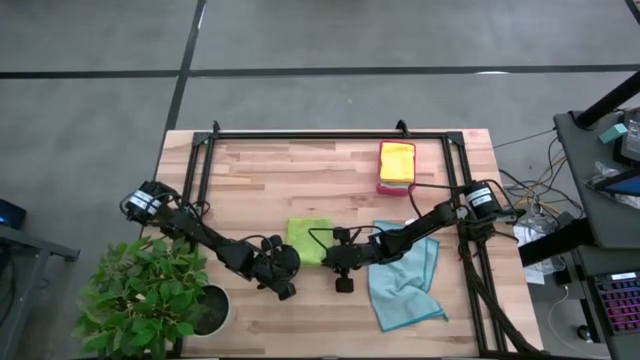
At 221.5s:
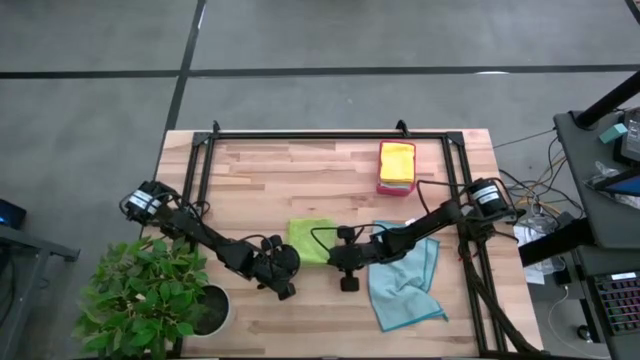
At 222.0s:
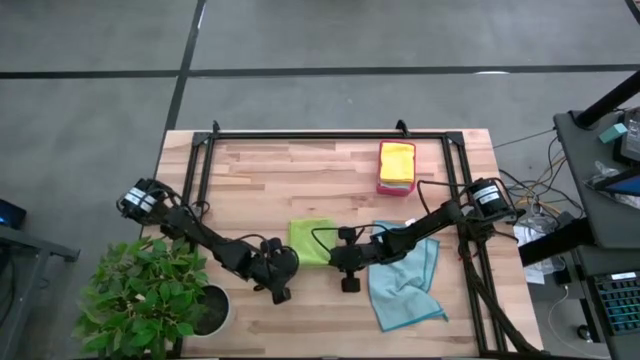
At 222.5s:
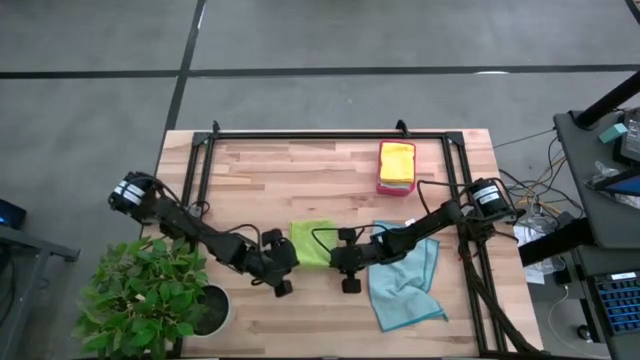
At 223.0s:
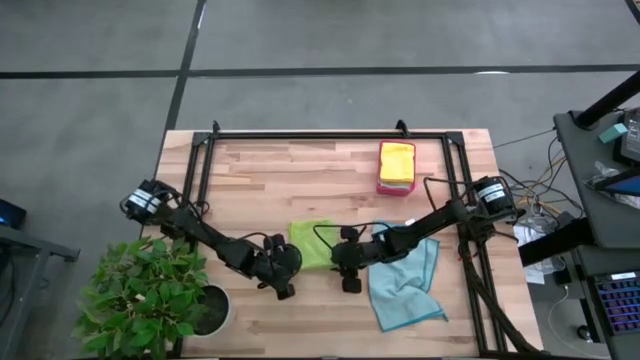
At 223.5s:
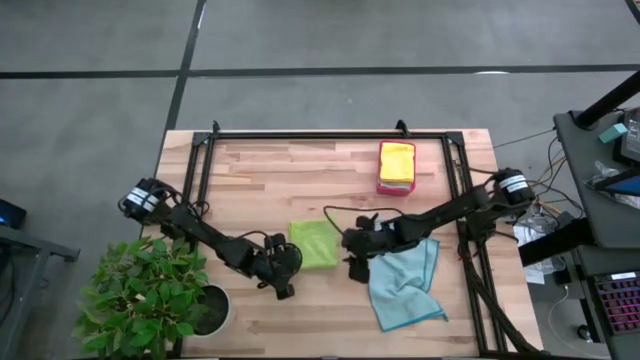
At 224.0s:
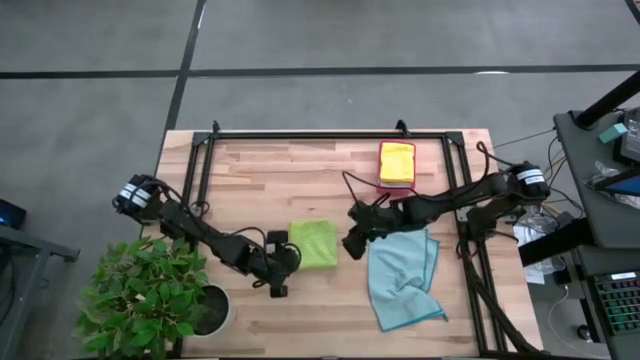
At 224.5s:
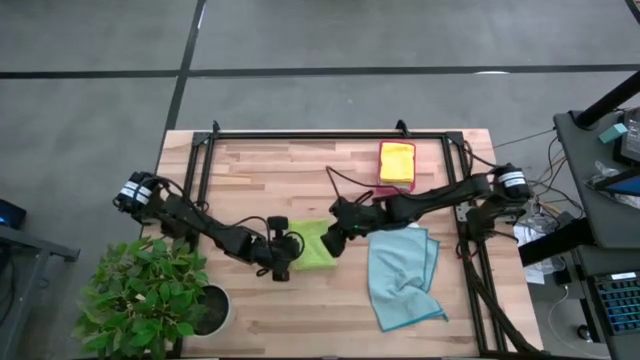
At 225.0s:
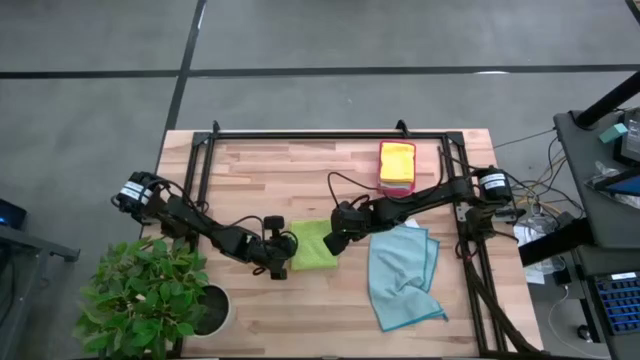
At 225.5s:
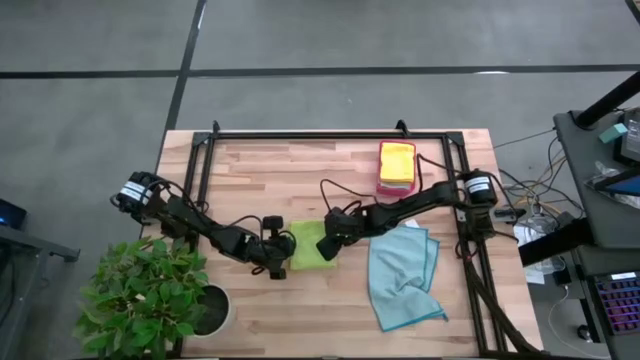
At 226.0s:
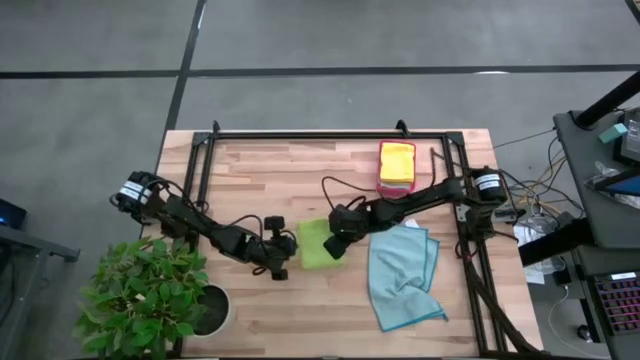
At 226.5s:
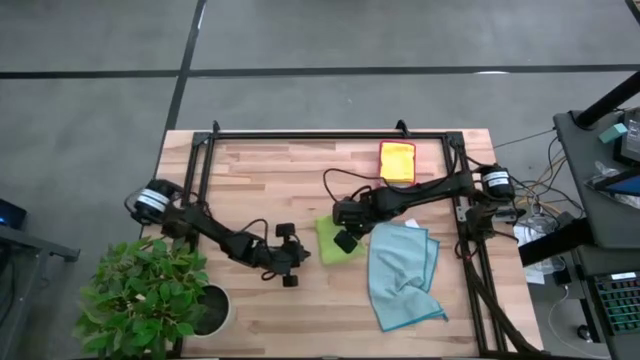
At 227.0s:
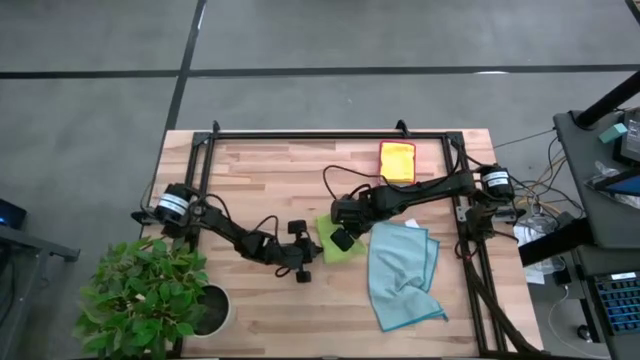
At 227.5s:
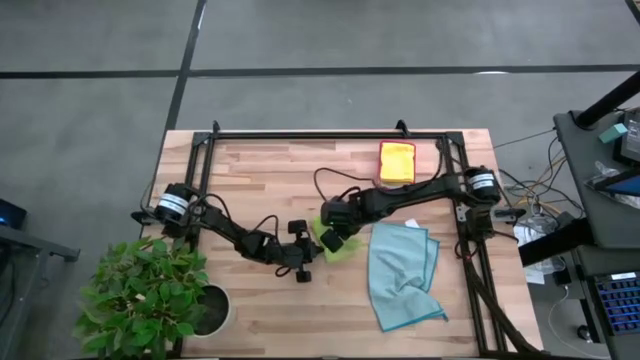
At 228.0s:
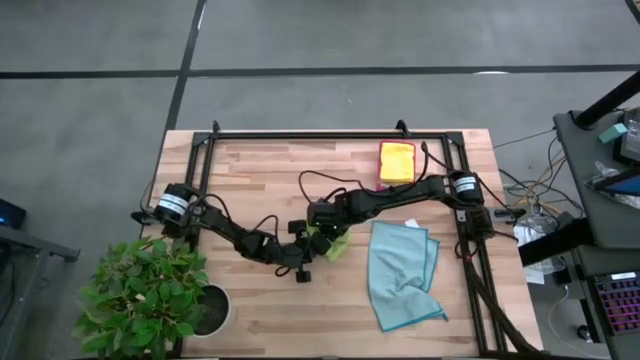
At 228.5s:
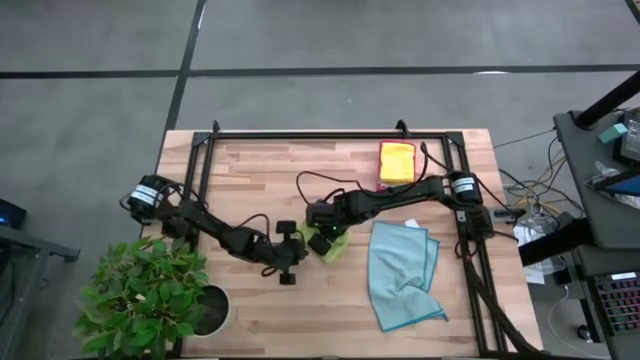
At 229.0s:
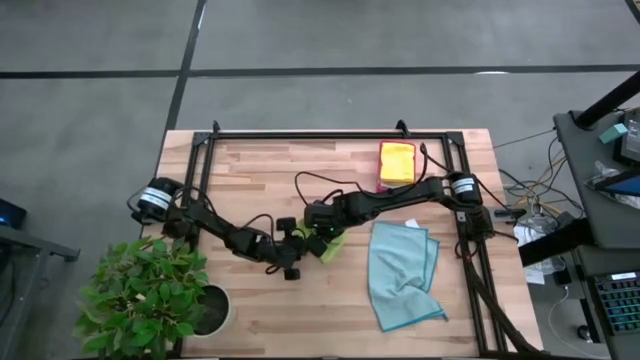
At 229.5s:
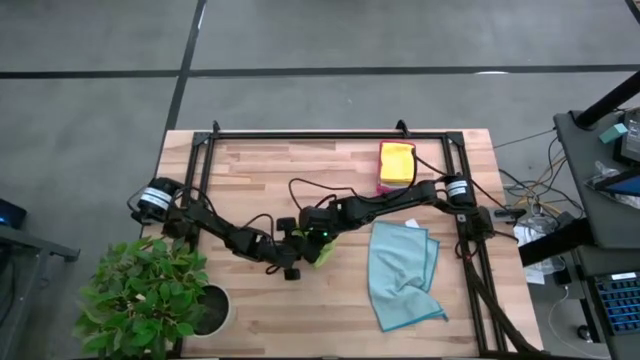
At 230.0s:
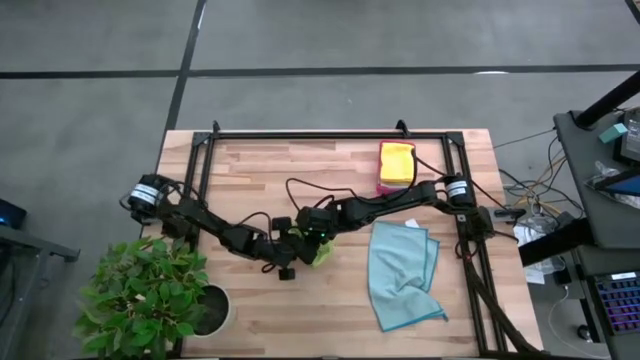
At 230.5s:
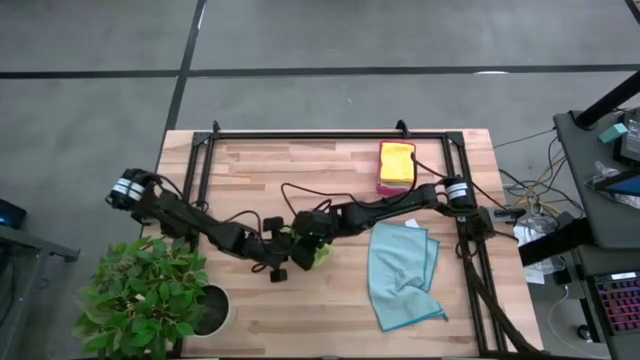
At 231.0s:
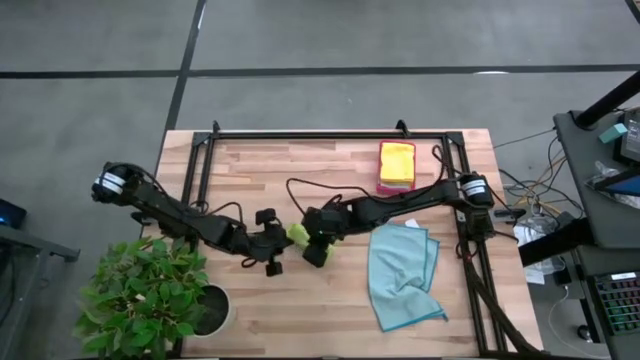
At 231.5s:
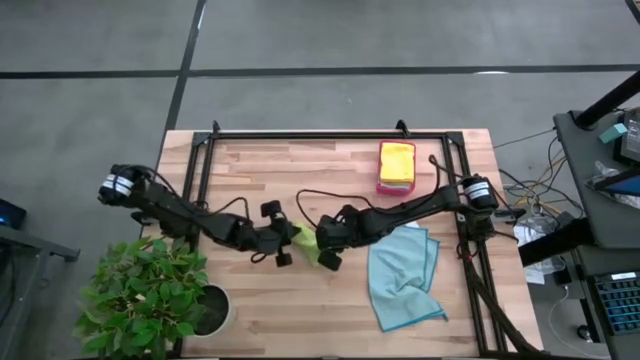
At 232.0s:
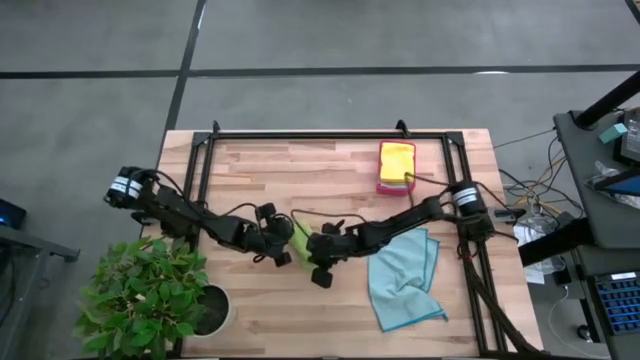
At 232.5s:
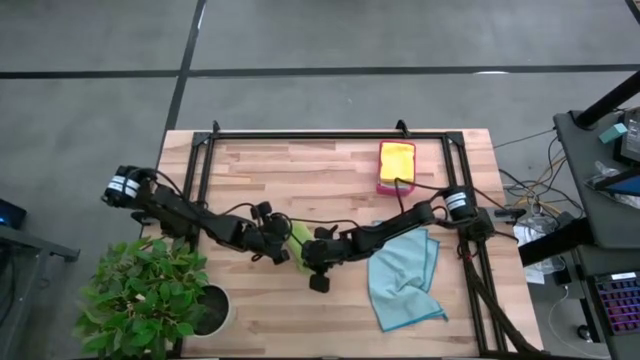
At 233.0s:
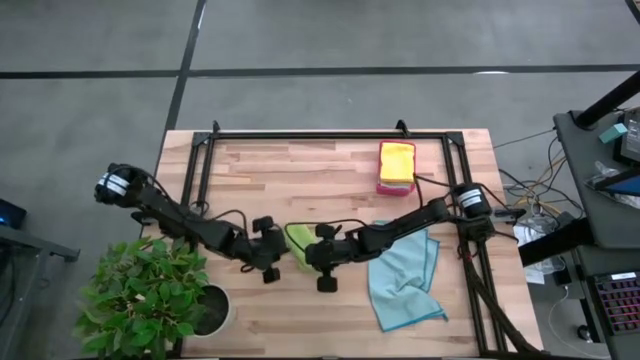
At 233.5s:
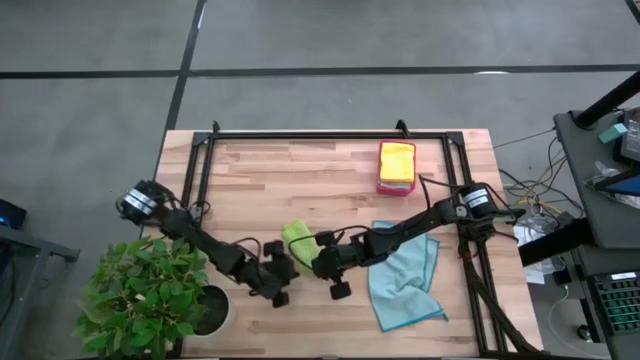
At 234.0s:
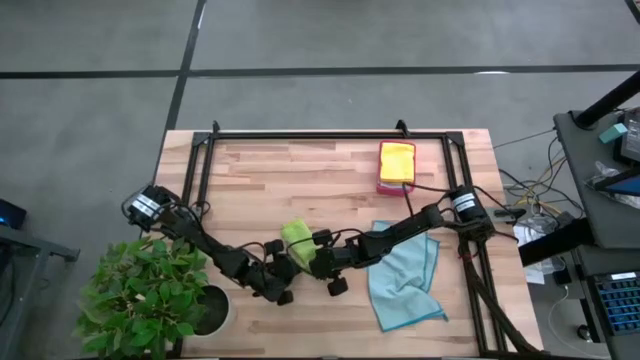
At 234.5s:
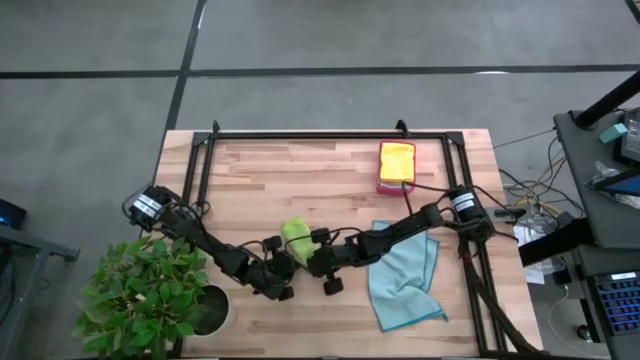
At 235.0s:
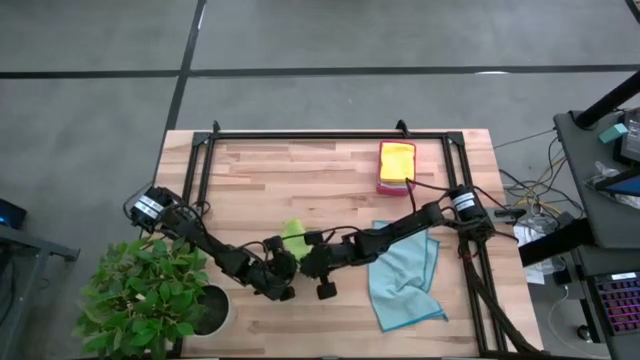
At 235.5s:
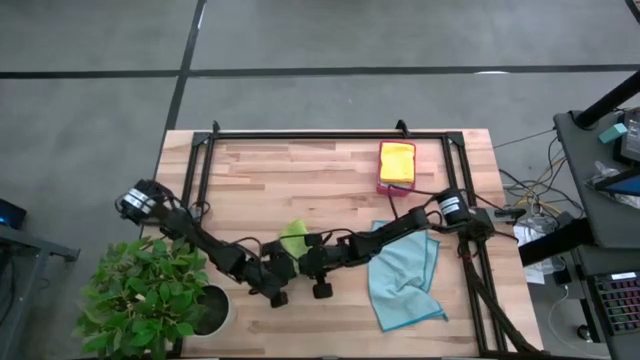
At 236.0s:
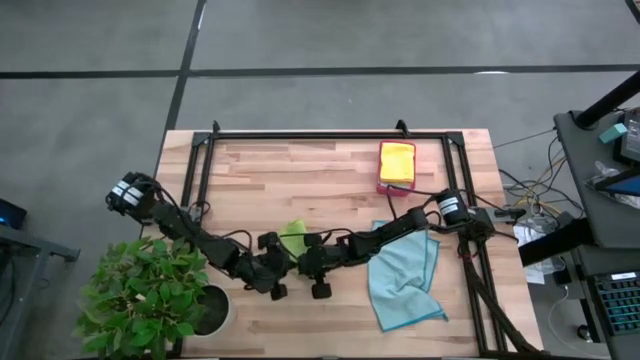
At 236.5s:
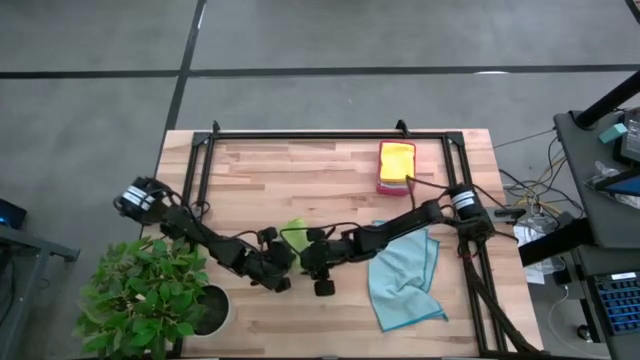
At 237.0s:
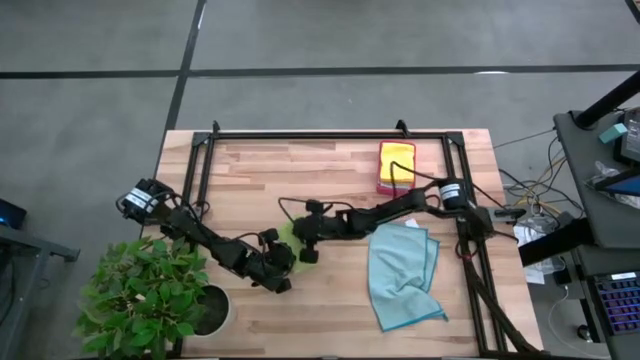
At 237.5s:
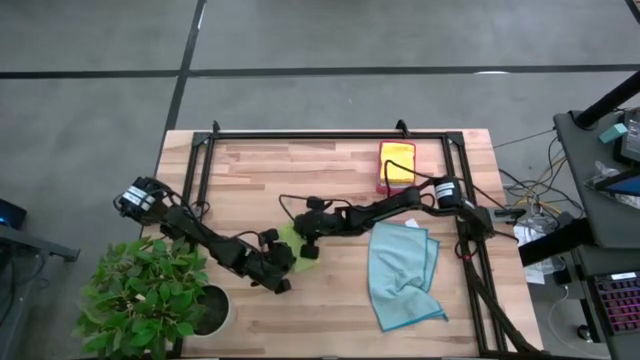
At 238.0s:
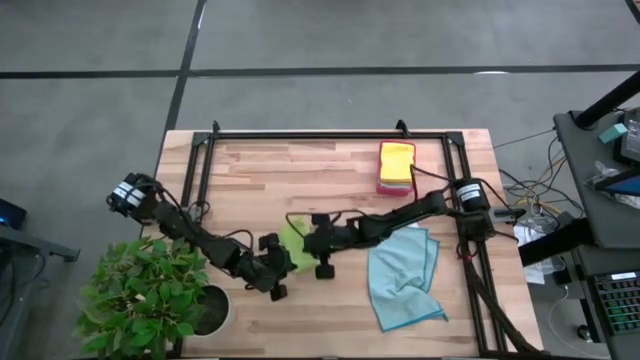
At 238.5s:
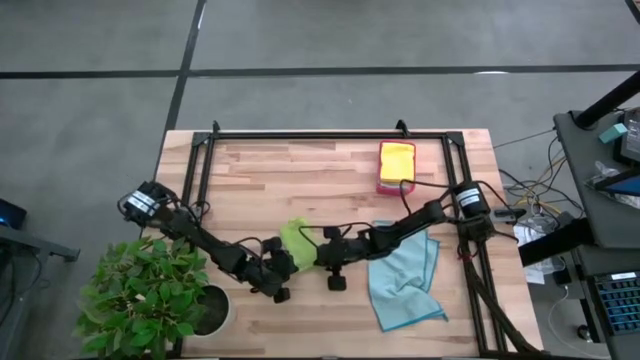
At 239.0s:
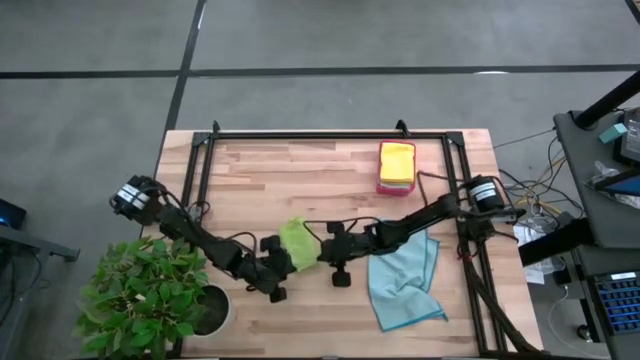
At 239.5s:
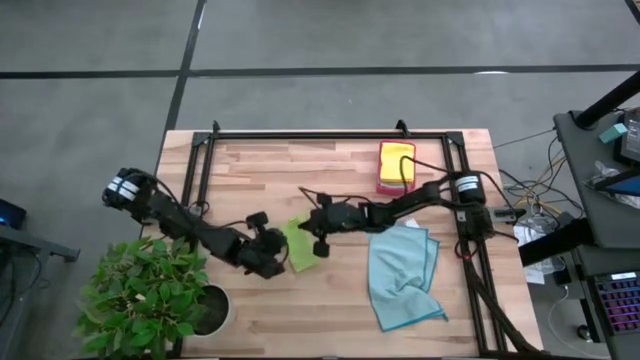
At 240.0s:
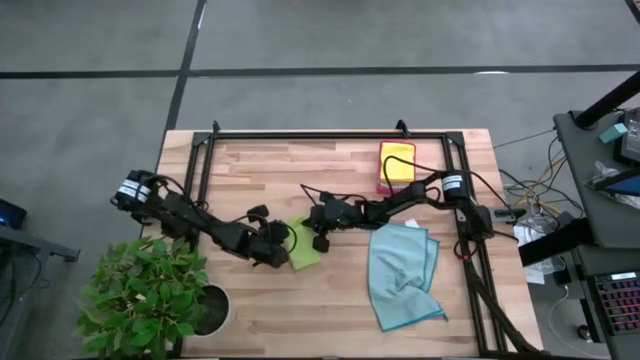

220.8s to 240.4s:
Task: Fold microfiber towels
Fold the green microfiber towel

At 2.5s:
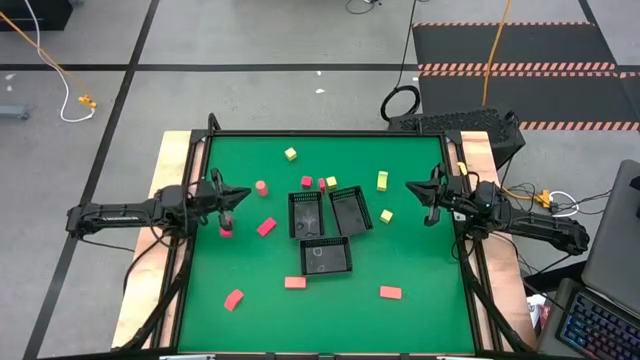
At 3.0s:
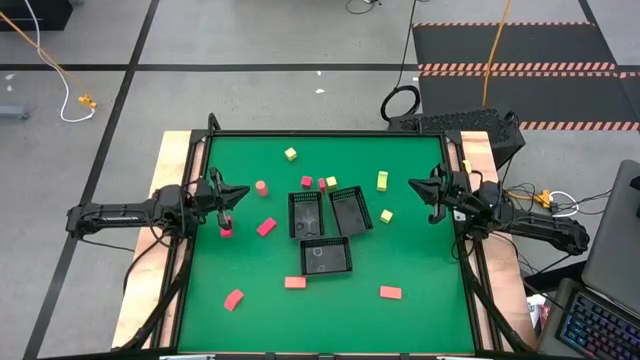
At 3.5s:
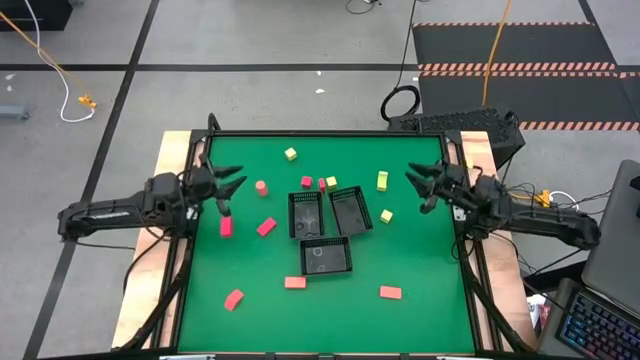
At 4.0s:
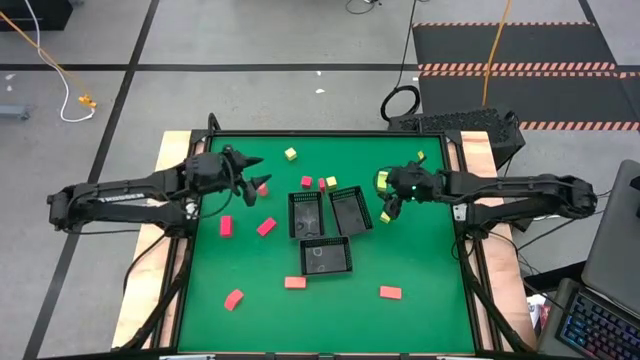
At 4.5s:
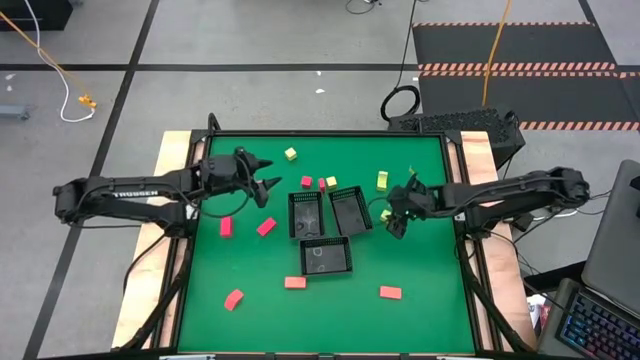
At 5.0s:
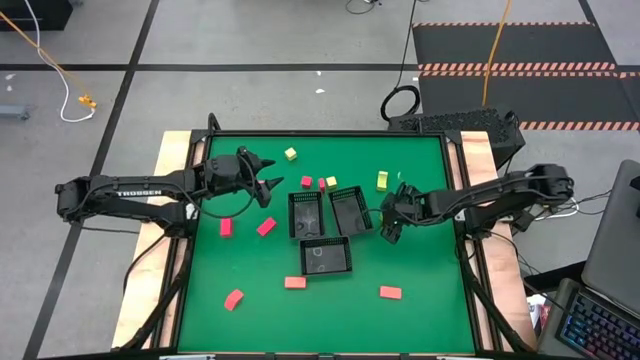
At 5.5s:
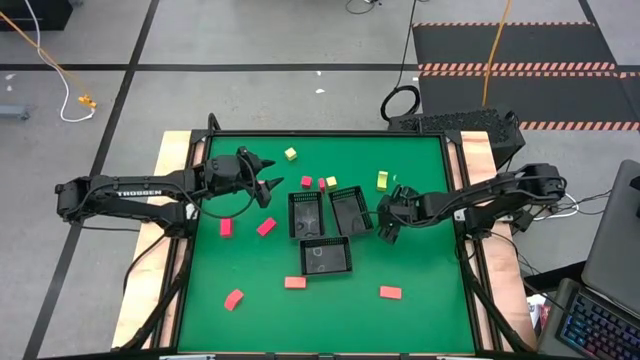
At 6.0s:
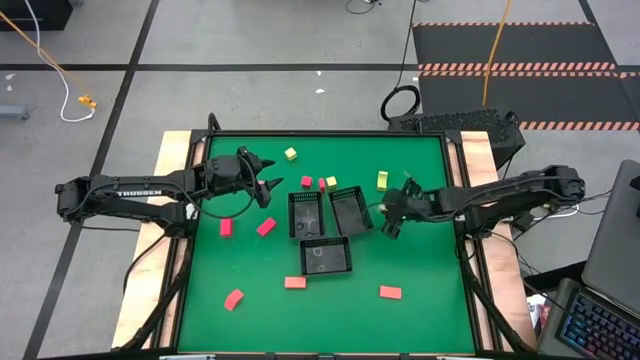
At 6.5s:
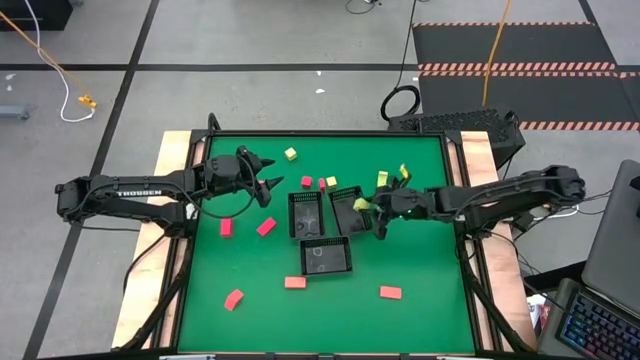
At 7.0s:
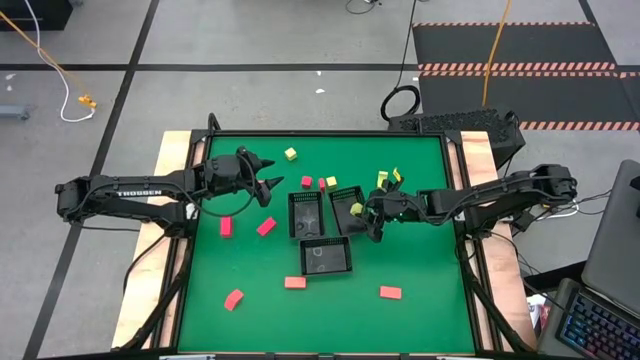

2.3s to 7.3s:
Task: Sort & place blocks by color
Put the green block into the top right black bin
